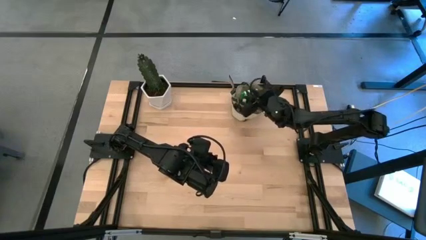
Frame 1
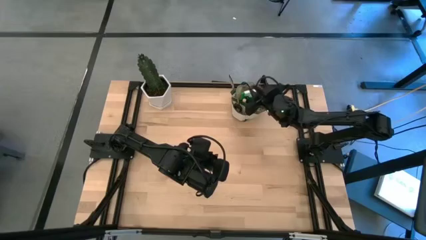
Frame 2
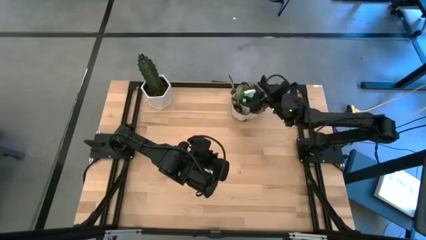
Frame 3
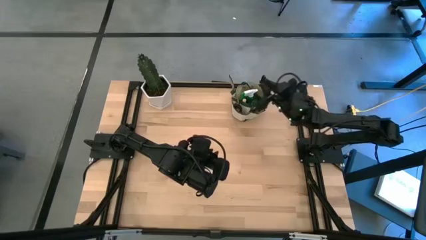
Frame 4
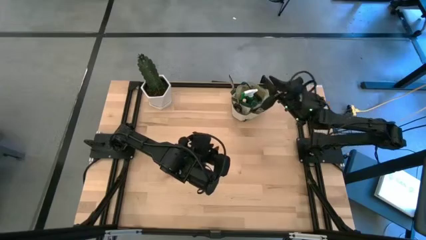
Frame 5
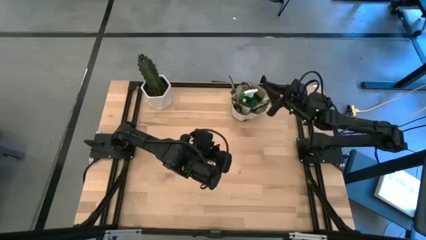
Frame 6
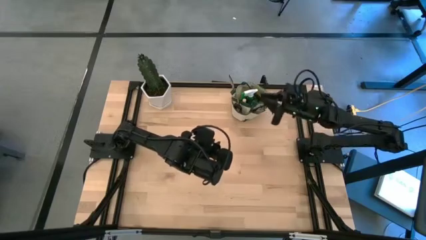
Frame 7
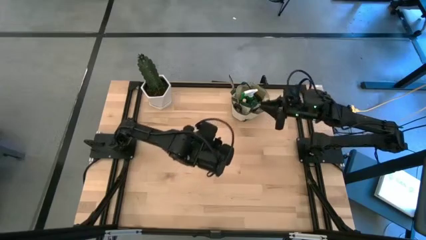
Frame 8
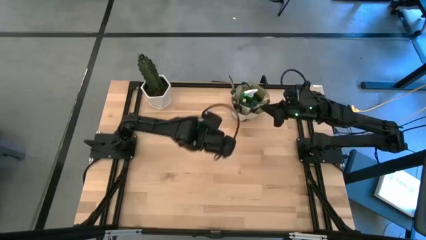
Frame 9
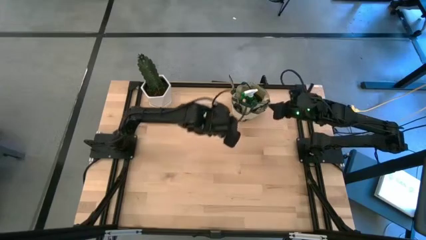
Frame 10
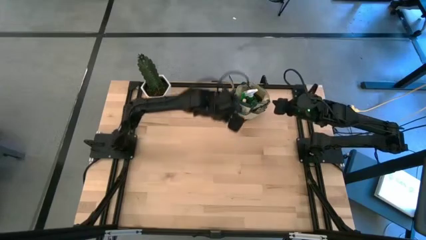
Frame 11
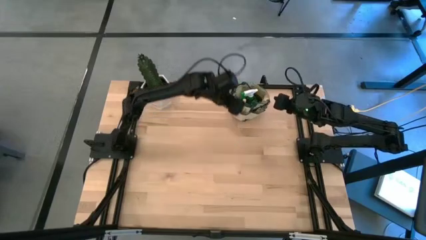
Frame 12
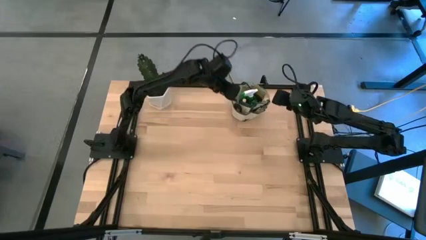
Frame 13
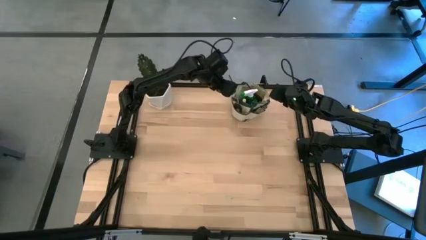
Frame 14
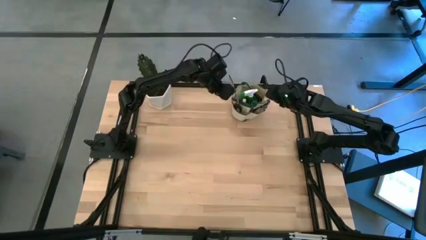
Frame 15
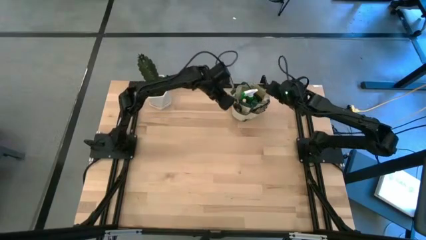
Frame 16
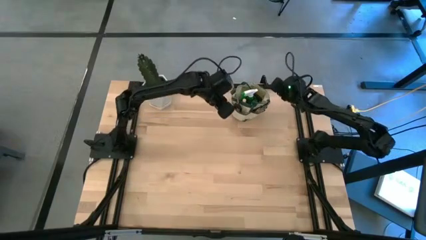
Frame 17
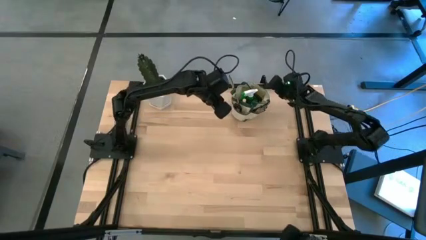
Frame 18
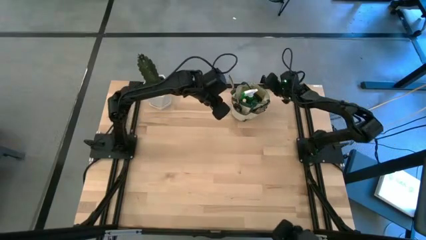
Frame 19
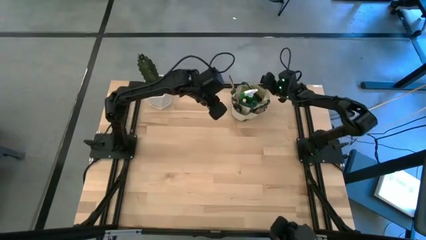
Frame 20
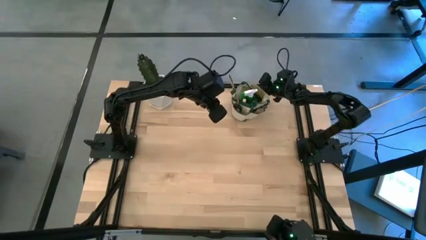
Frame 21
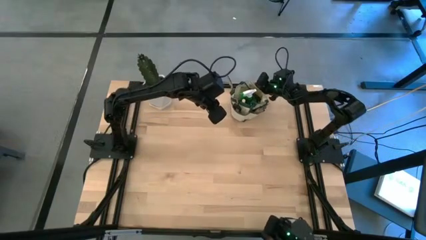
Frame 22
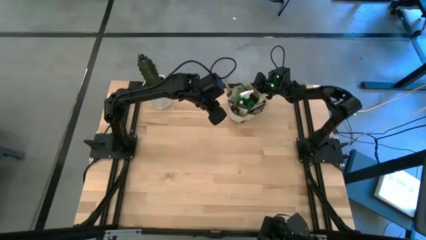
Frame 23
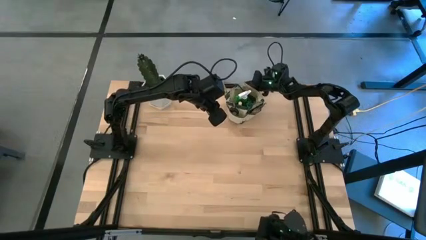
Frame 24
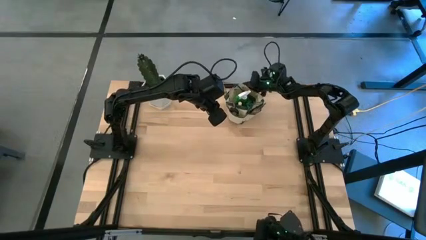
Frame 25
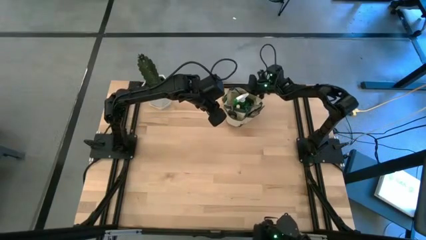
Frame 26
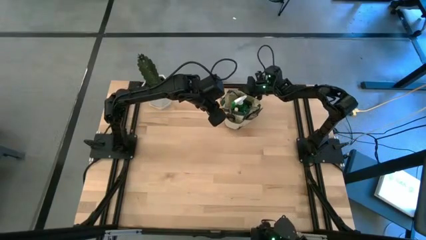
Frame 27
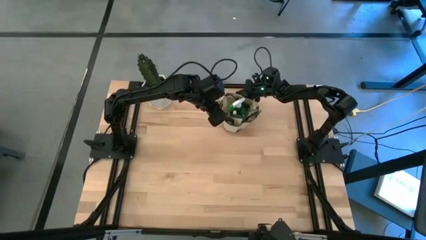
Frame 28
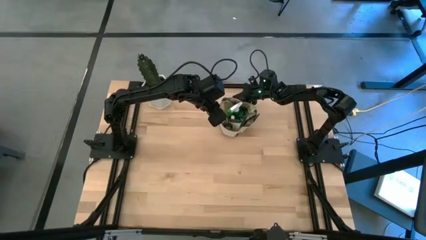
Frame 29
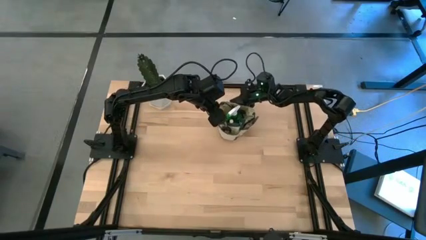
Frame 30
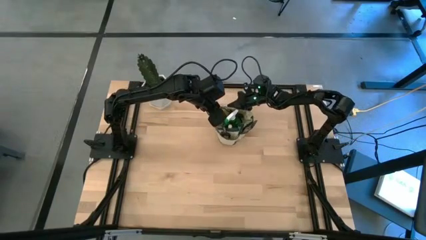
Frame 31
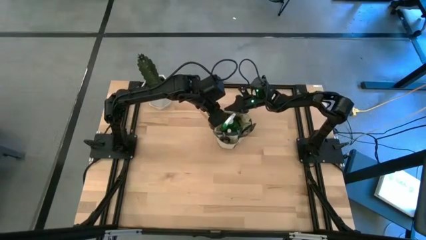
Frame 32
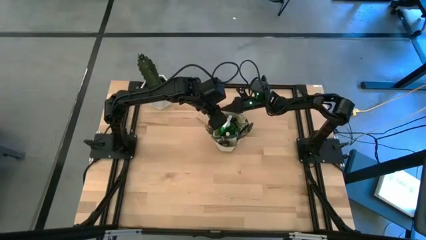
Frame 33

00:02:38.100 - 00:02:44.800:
Task: Pick & Place Garden tools in Gardening bag
Move the gardening bag to the center of the table

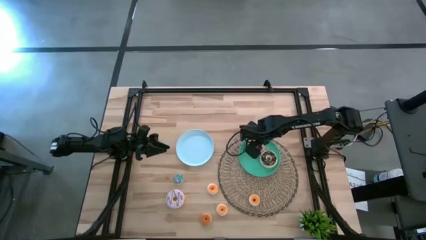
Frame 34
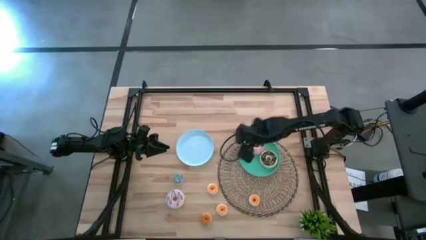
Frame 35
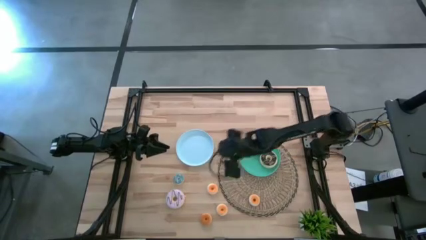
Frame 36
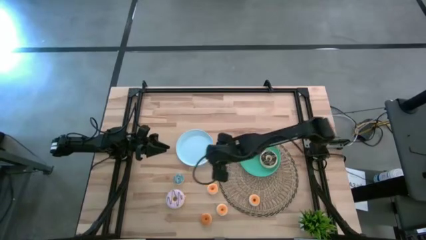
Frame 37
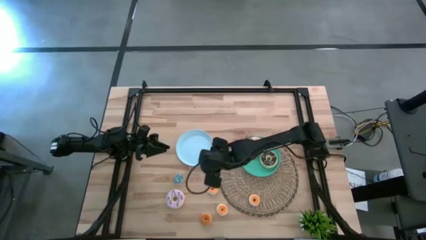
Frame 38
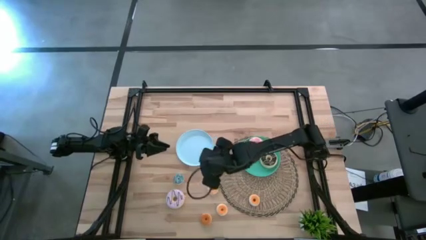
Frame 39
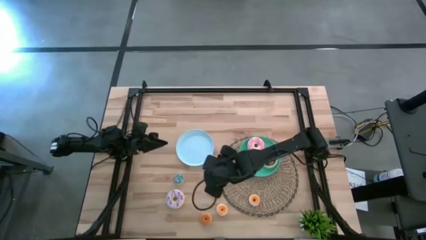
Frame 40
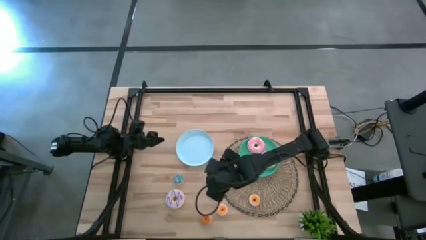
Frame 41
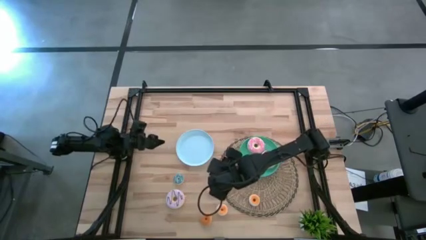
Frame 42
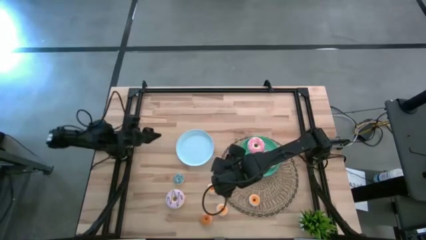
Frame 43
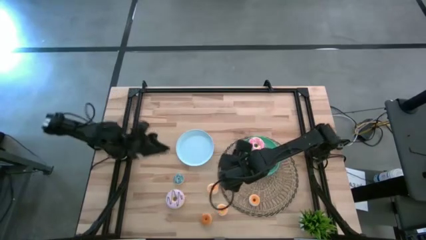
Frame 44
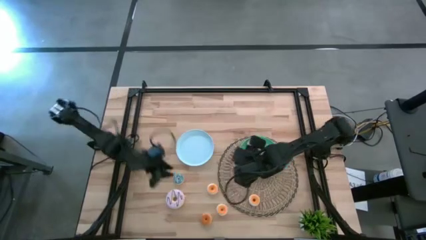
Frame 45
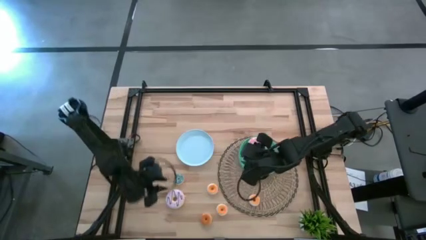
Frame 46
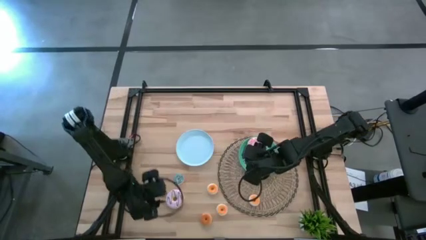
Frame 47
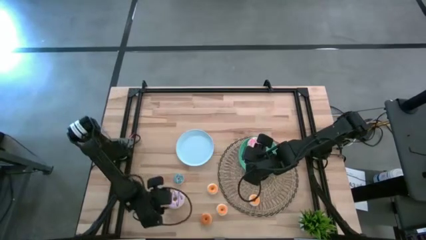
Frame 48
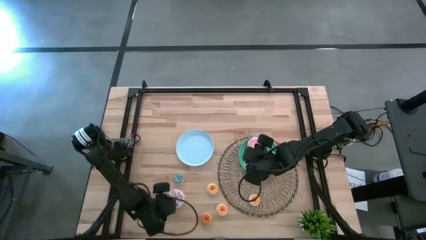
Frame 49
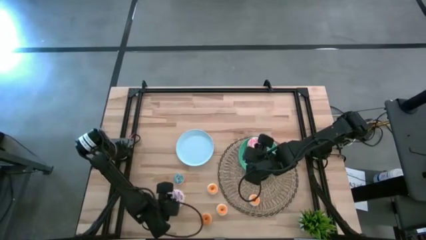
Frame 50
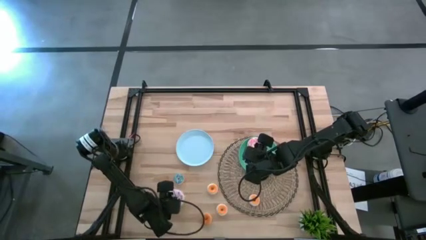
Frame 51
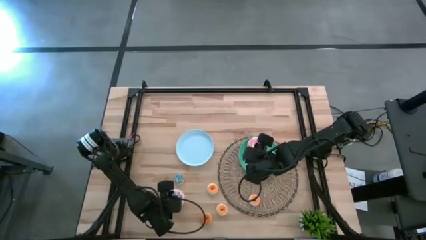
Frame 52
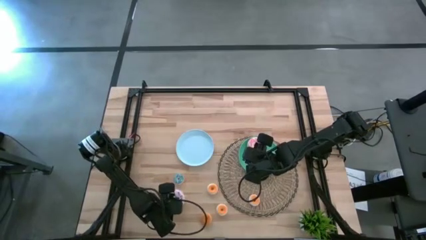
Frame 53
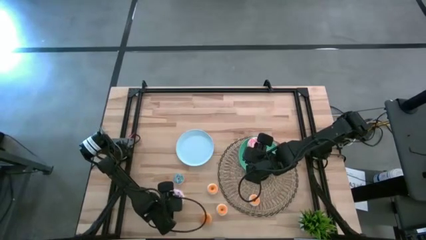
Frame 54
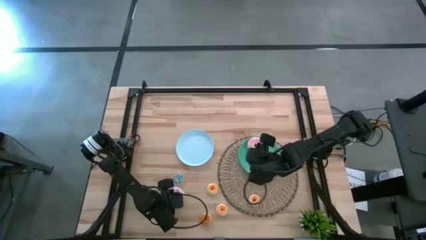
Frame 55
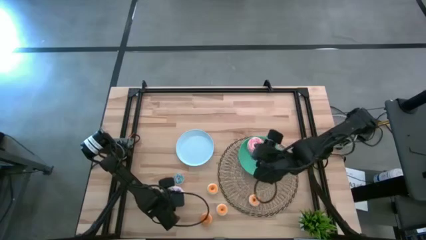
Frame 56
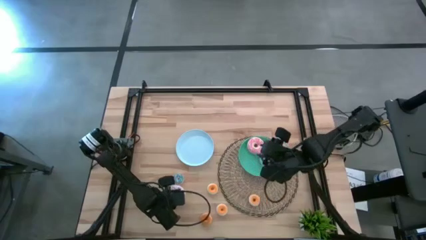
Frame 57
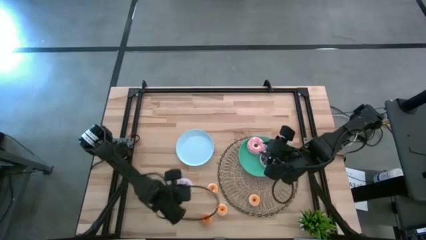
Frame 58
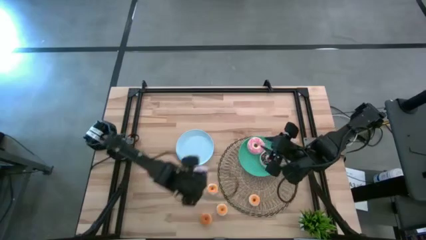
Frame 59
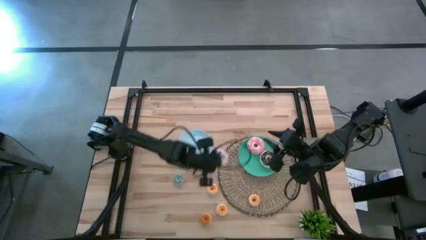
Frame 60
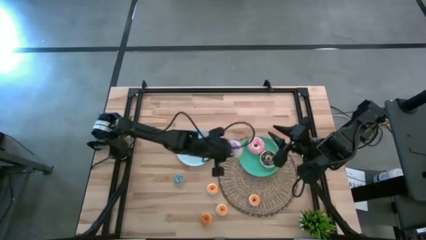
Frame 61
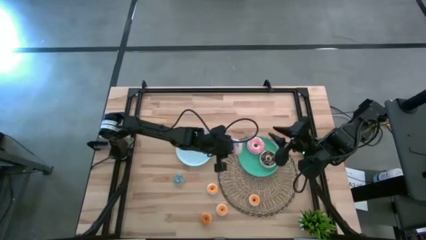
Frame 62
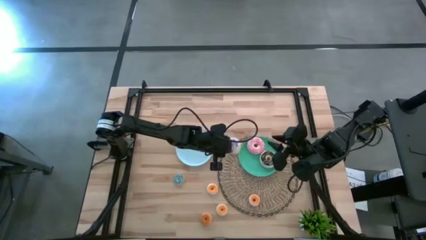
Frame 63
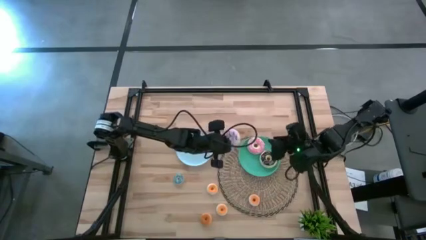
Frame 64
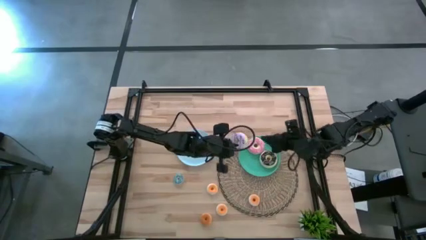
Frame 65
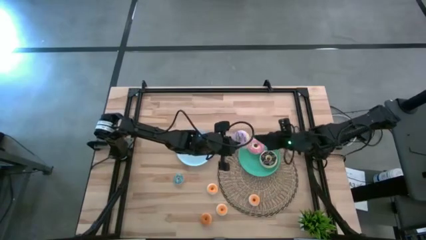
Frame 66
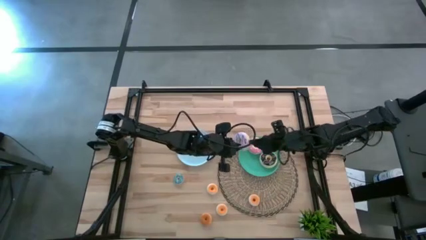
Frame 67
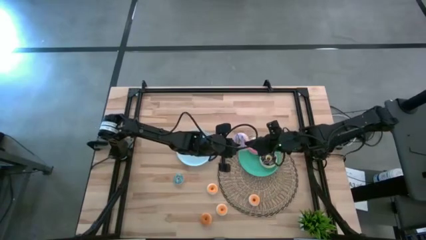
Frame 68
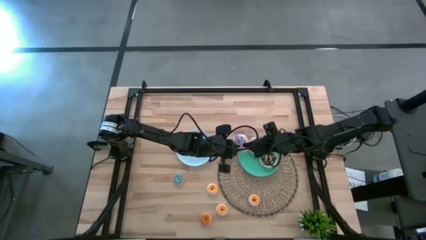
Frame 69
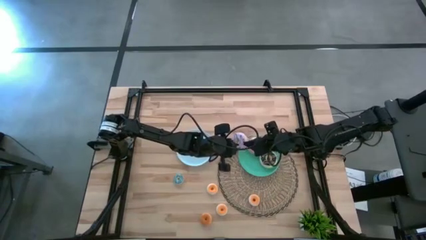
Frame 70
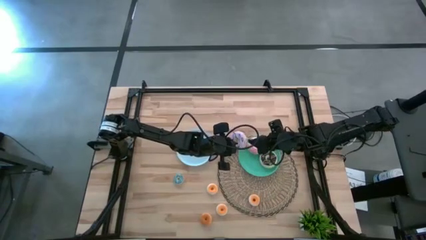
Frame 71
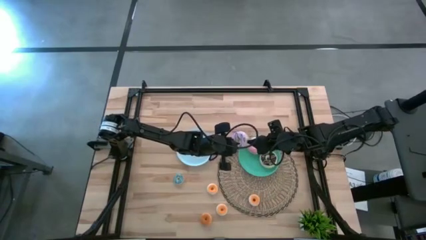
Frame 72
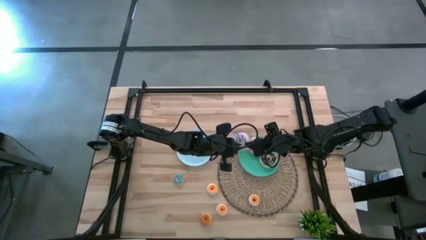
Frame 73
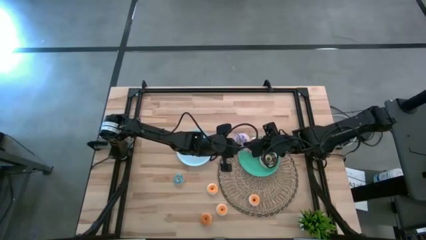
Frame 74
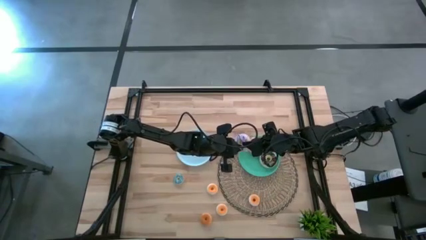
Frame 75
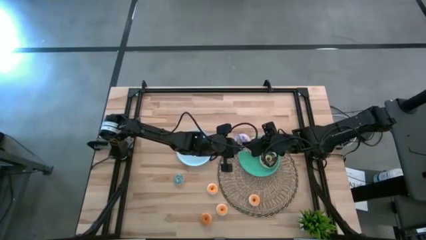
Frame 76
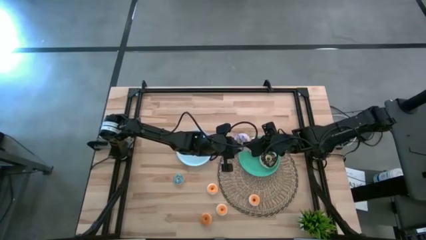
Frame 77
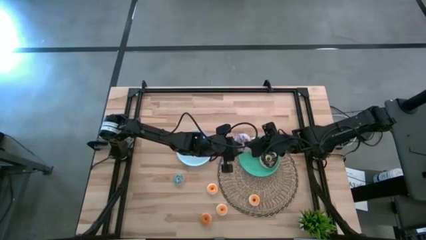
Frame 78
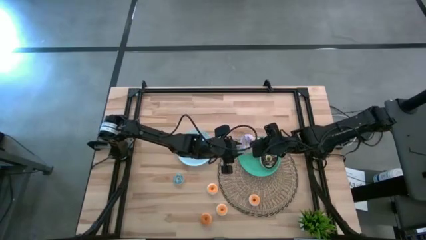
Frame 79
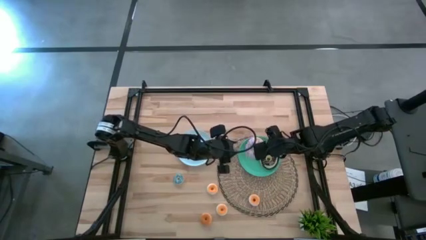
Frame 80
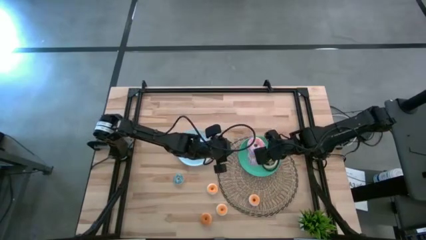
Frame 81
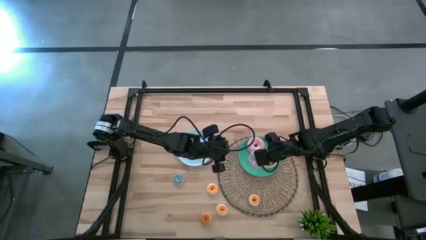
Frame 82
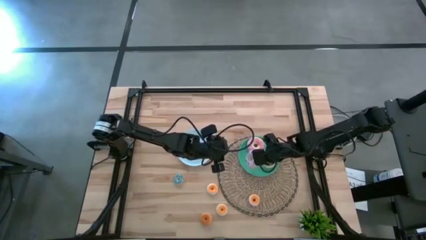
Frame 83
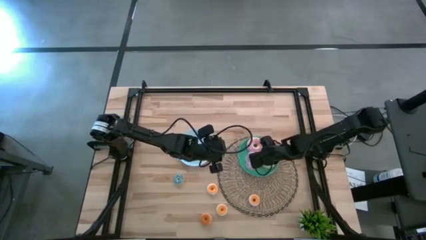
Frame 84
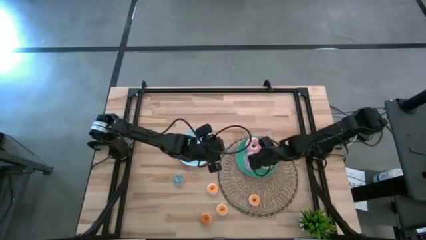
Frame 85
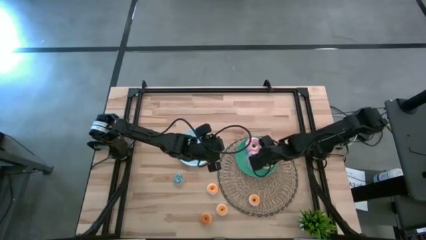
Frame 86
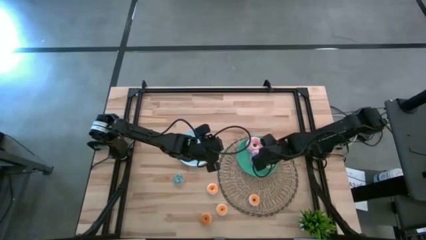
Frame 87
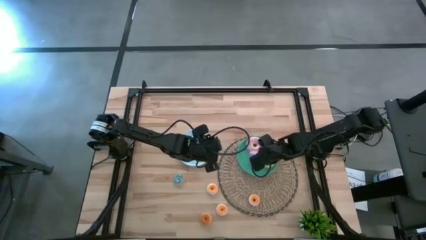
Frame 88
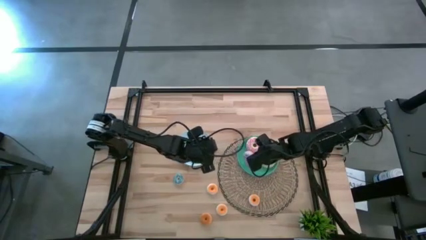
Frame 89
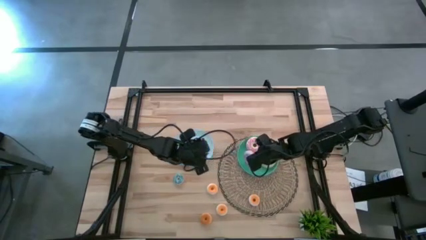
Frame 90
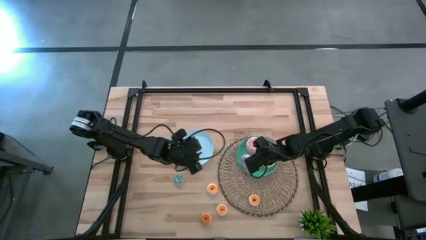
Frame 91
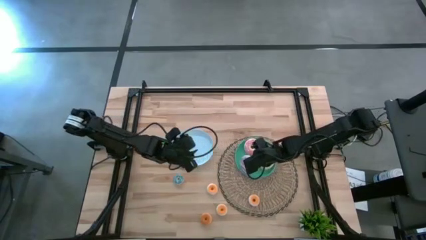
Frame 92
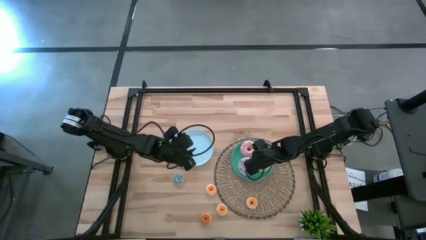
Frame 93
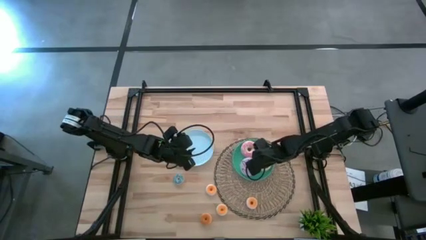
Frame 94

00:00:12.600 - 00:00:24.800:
Task: Pick & Place donuts
Put the large purple donut onto the green plate
